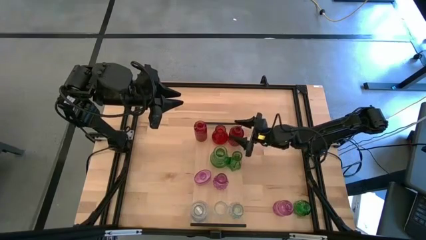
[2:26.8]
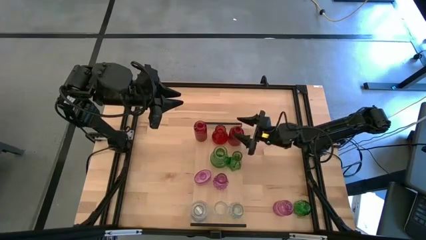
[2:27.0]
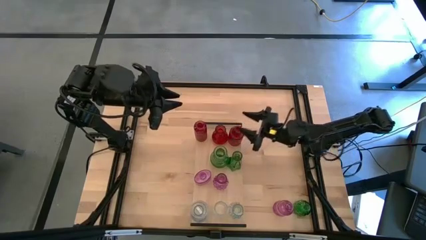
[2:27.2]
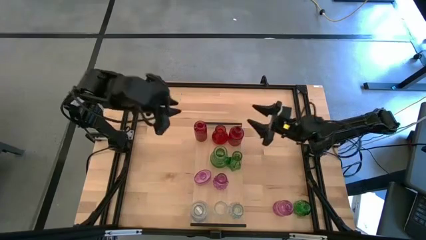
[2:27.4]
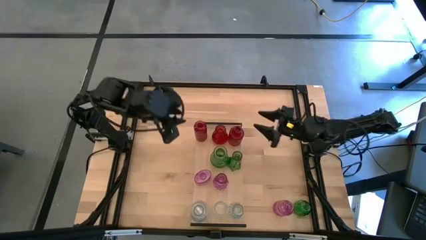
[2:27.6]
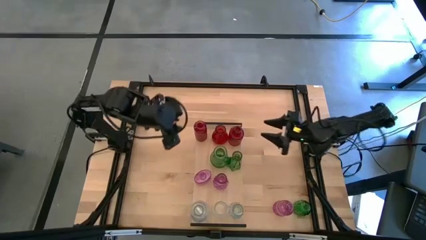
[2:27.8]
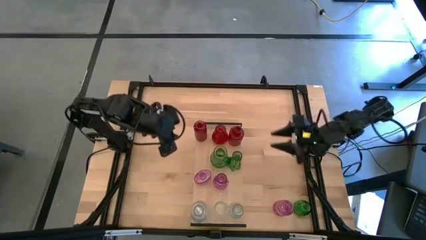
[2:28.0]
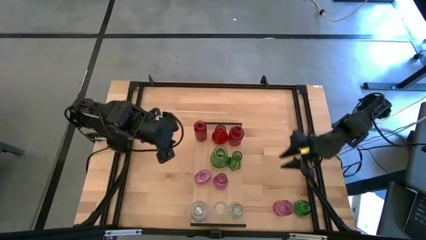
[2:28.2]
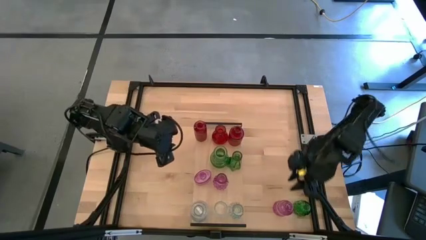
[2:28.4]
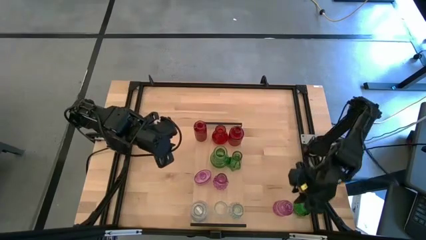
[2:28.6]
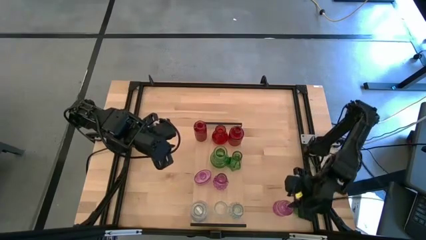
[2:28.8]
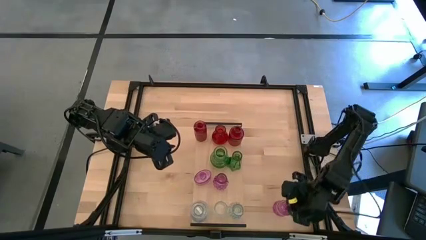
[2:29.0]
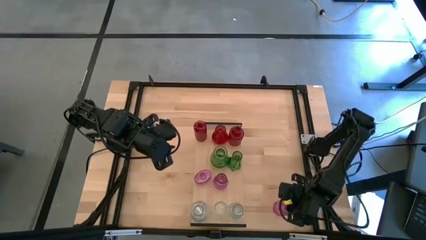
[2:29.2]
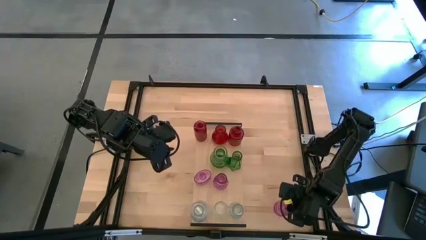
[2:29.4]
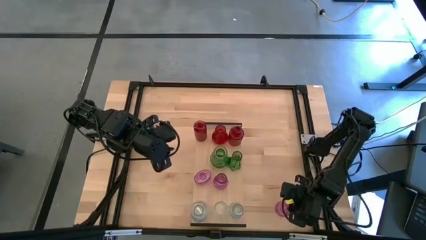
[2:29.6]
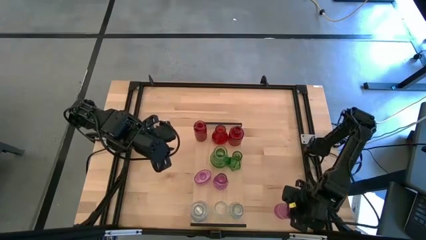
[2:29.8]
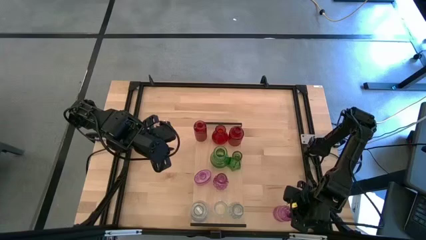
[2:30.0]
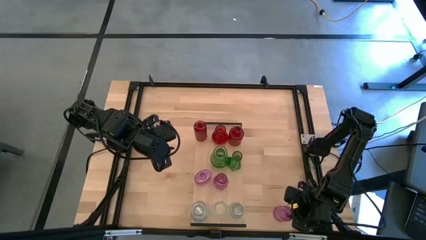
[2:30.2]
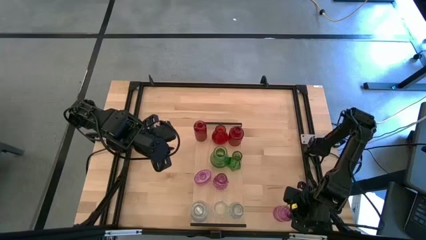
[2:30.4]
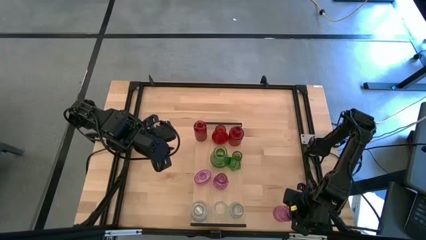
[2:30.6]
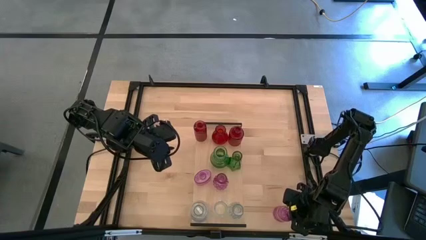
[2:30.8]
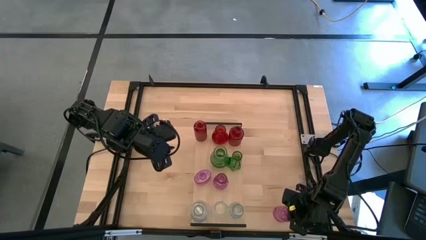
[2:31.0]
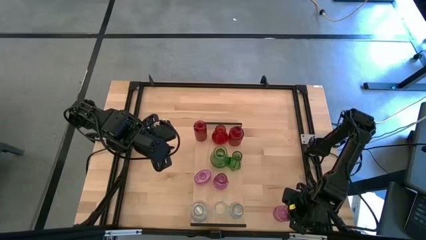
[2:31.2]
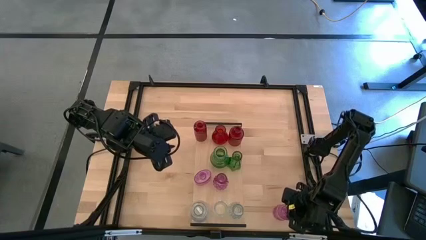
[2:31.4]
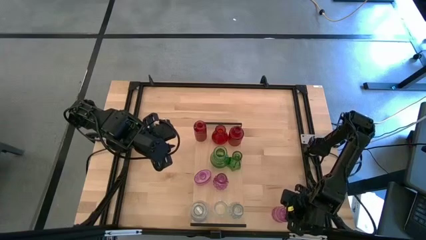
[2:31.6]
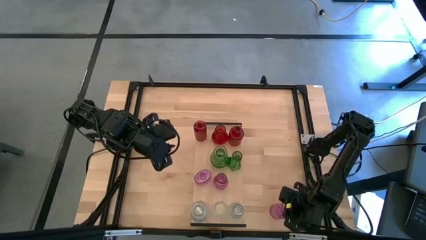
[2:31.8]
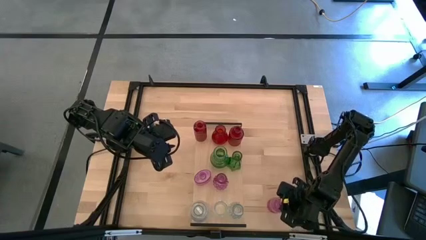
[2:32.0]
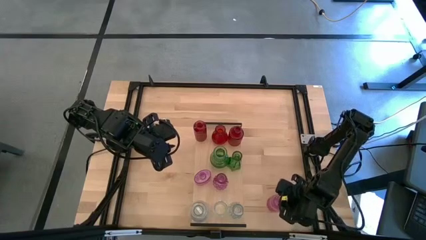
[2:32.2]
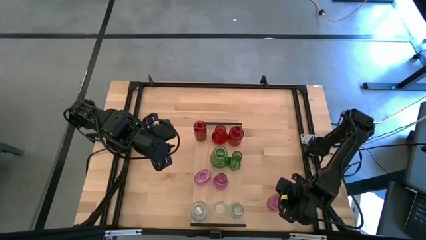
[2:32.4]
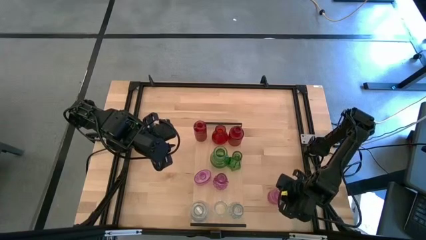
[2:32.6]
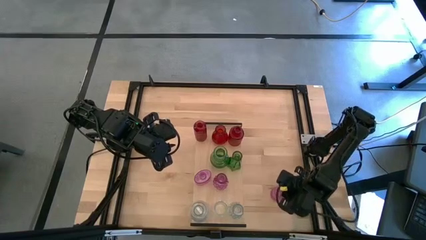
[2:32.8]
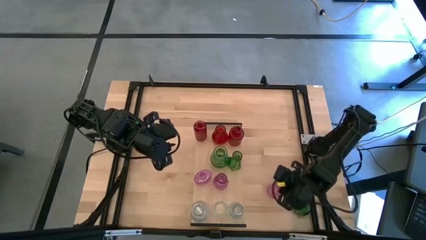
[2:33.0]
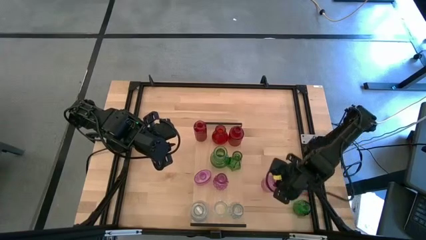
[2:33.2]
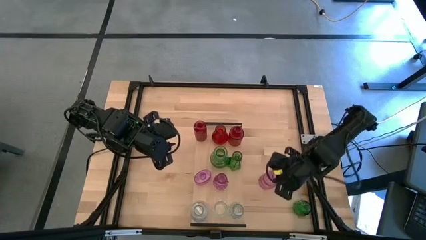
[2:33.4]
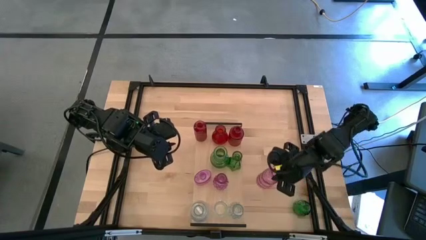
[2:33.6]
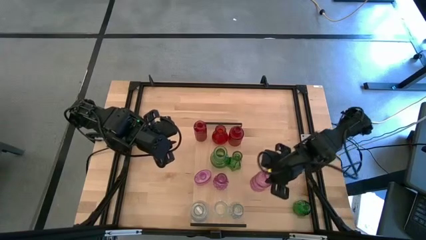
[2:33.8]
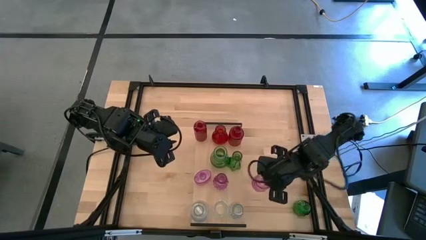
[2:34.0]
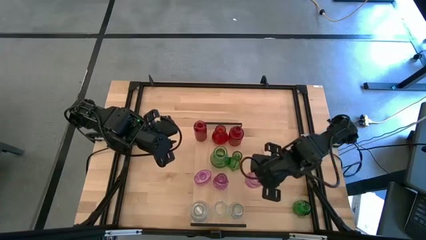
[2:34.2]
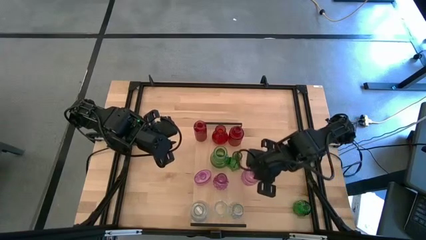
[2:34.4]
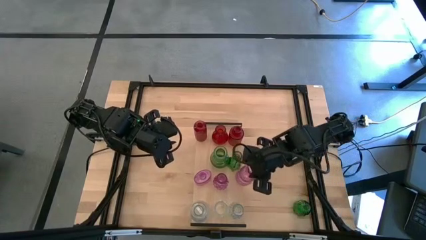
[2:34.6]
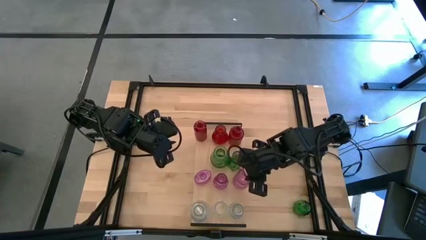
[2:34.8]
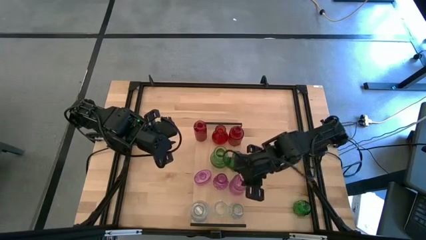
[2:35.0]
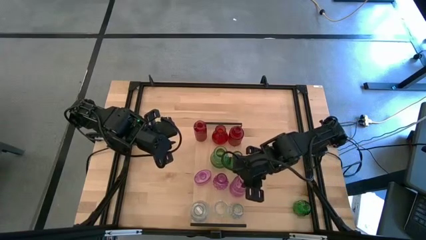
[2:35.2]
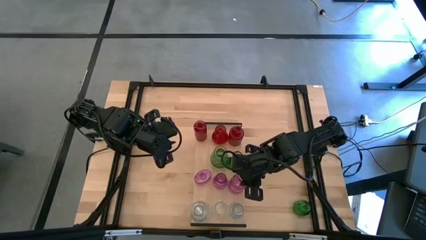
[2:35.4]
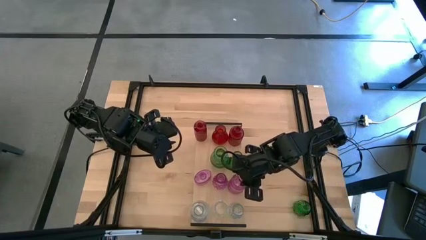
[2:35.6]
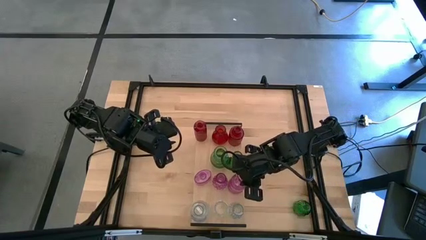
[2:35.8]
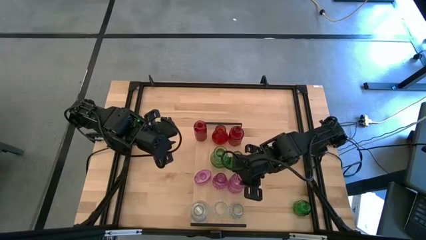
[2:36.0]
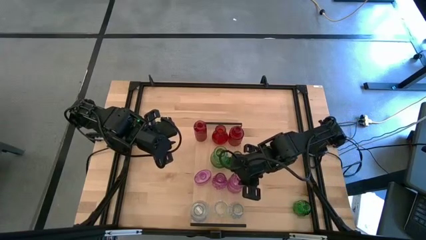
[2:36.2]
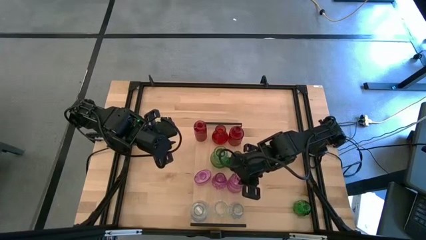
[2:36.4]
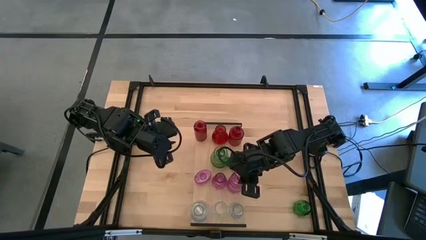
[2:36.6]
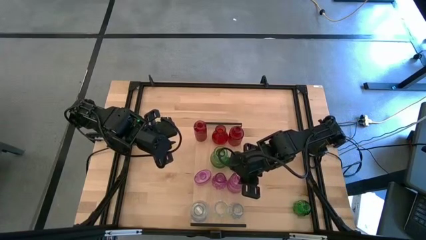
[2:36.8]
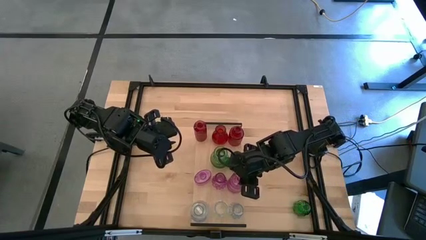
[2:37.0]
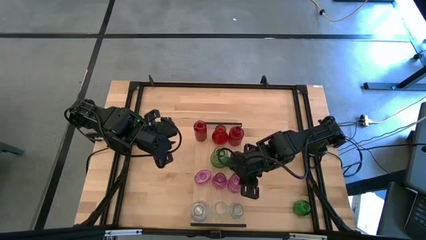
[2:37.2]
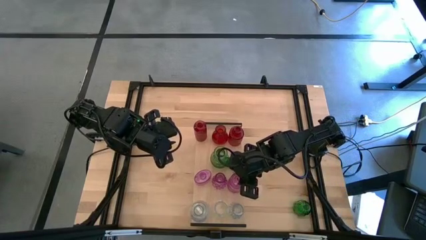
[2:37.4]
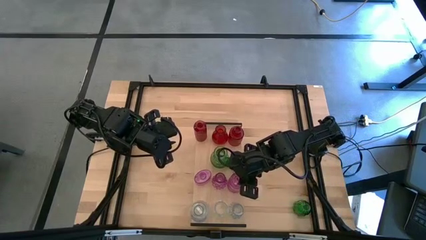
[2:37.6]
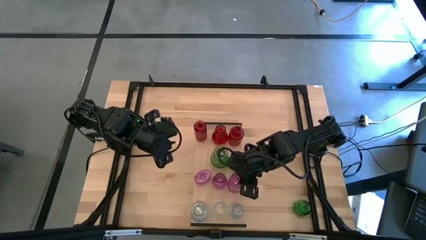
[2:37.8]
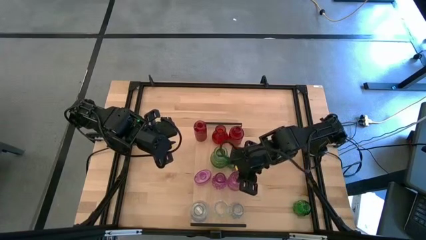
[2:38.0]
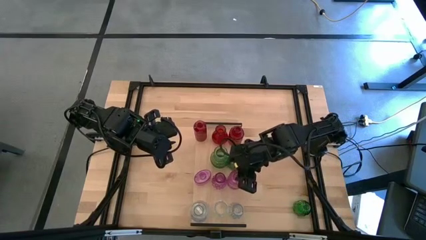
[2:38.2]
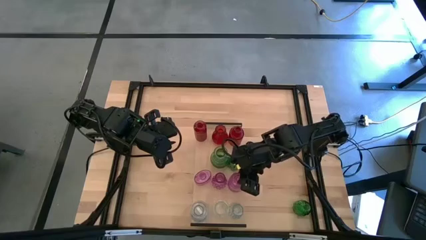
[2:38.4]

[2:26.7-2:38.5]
Task: sort vases onto shelf
Put the pink vase on the shelf aligned with the other pink vases

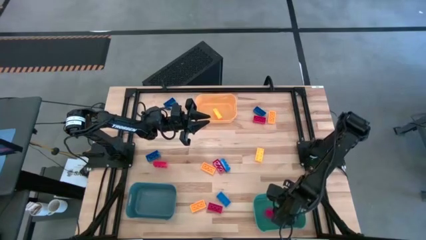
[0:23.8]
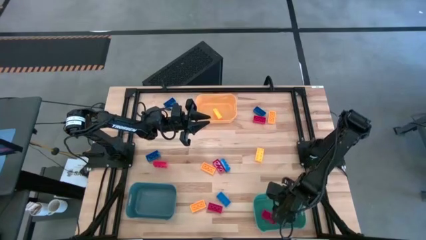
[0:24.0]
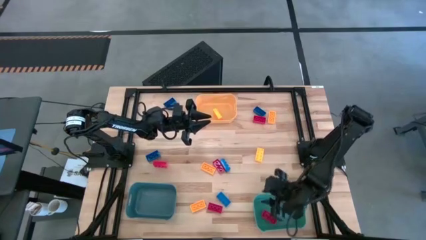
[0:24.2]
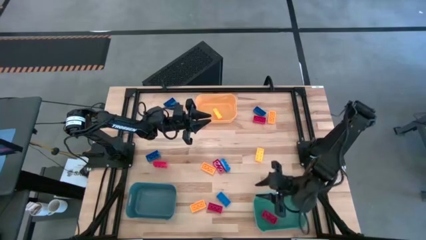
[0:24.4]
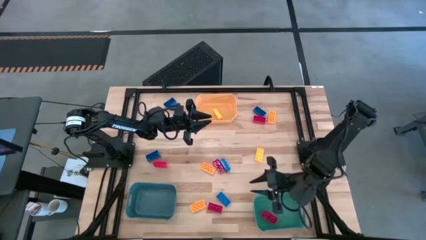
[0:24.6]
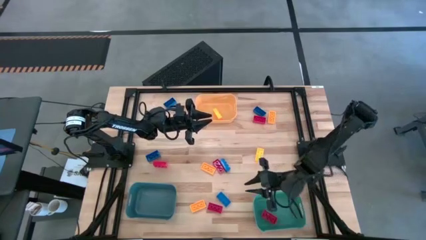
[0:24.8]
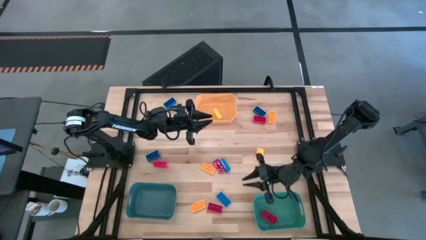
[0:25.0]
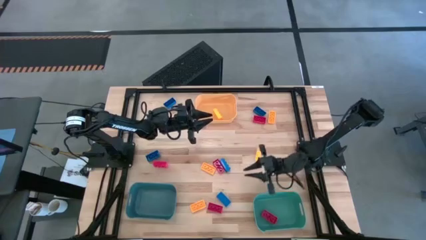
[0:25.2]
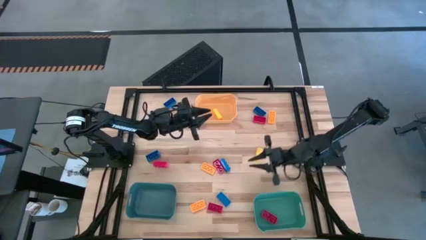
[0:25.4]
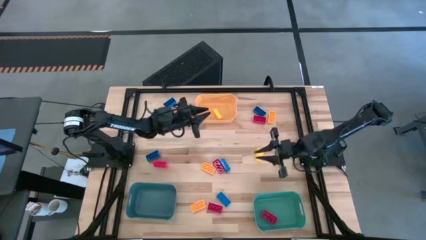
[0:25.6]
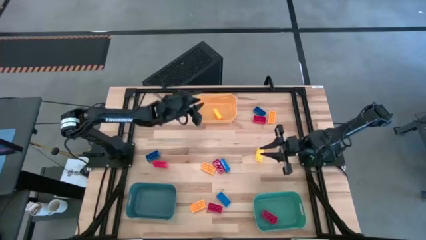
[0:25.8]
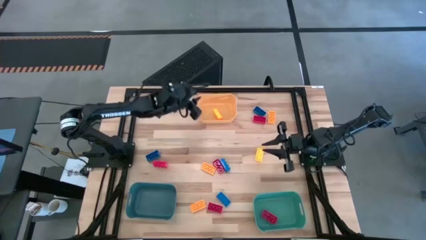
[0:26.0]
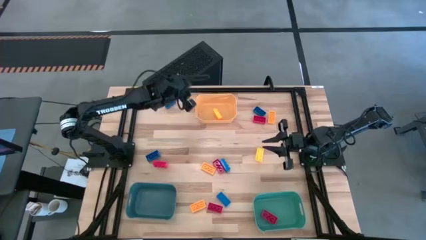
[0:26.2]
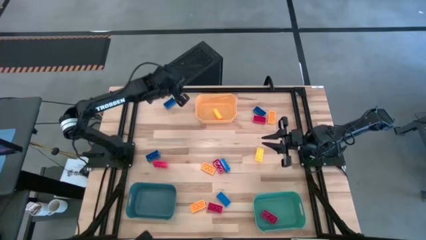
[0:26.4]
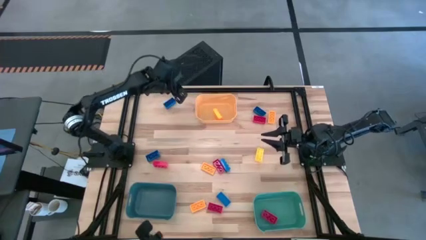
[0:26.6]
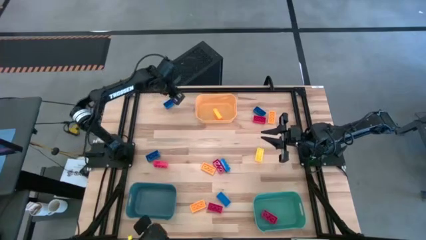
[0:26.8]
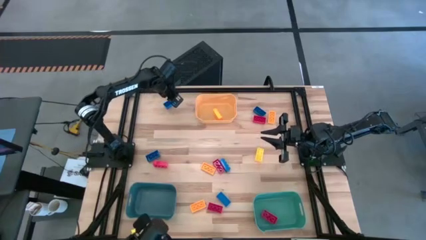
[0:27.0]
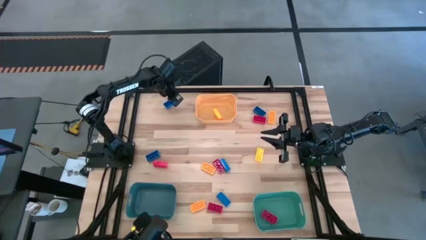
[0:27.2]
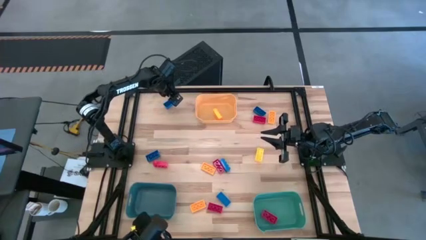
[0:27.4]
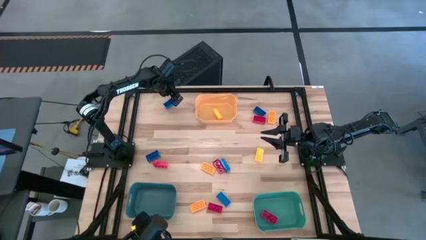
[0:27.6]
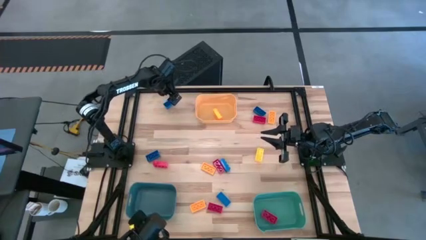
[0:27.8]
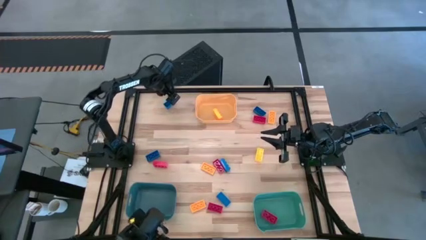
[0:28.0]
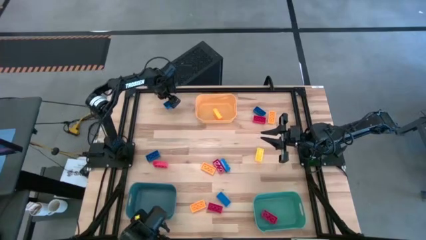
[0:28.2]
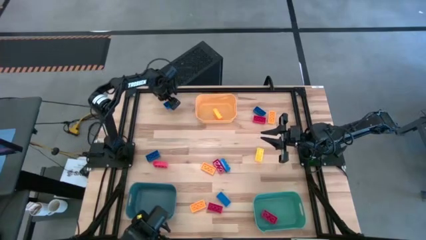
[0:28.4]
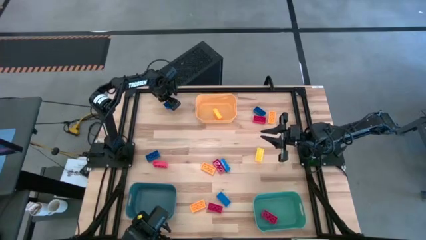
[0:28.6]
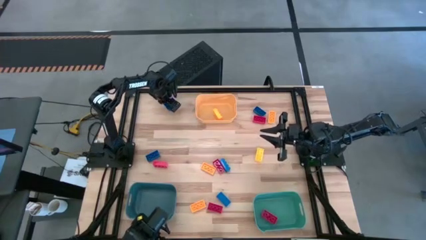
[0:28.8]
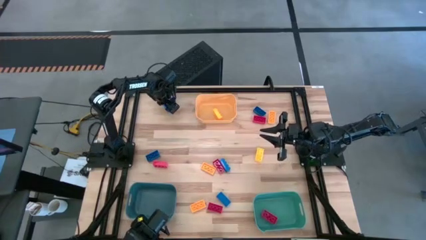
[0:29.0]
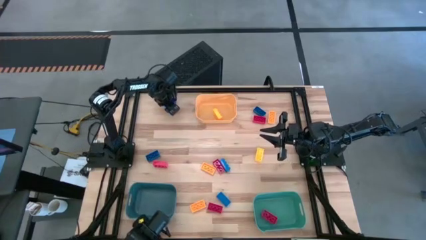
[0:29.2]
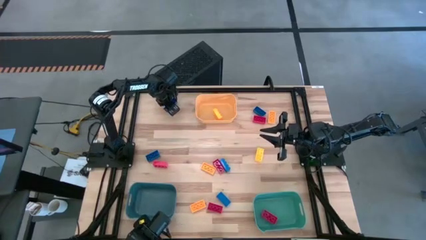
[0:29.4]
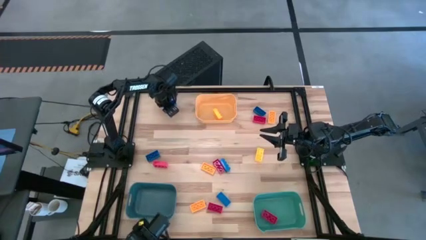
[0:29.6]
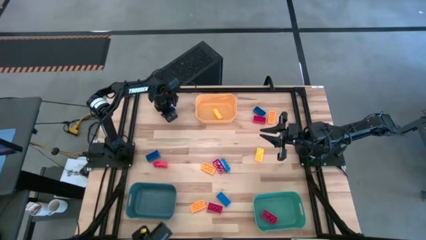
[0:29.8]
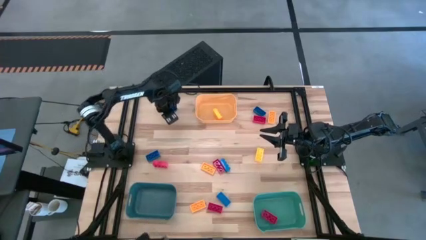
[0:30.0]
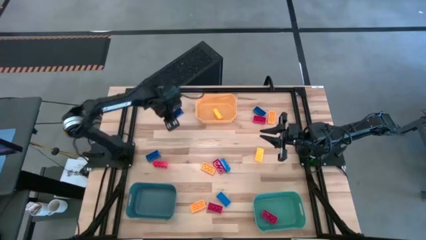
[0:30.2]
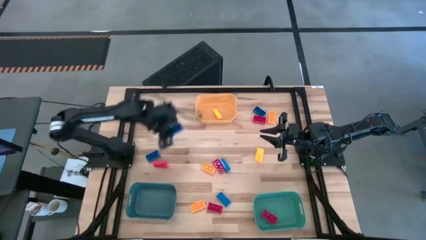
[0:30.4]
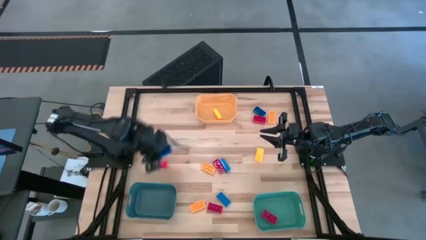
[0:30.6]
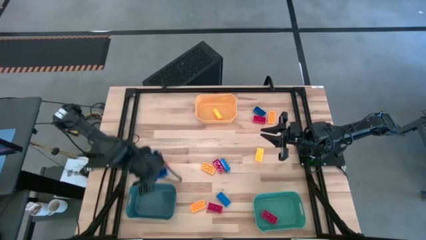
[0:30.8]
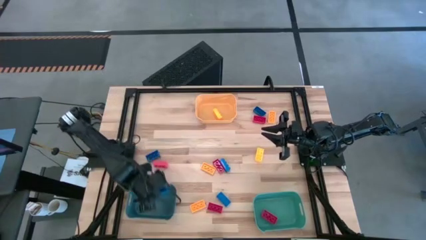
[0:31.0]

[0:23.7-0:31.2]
Task: Sort & place blocks by color
Put the blue game piece into the blue bin
